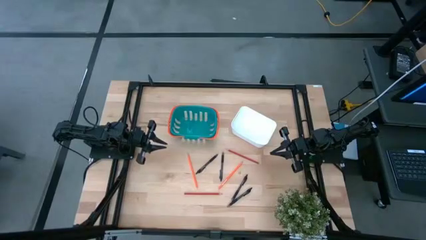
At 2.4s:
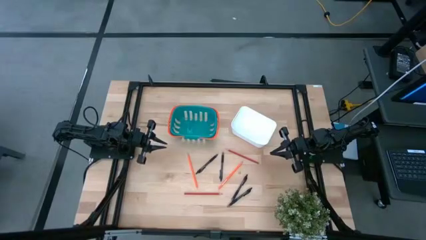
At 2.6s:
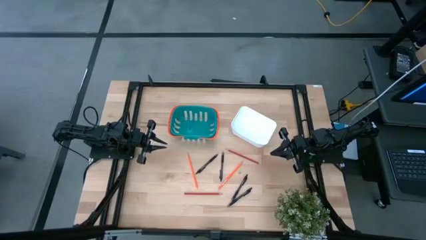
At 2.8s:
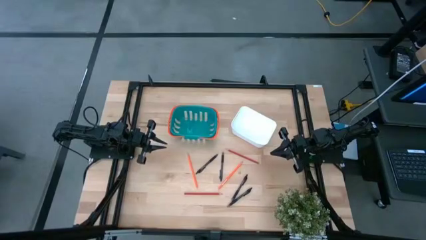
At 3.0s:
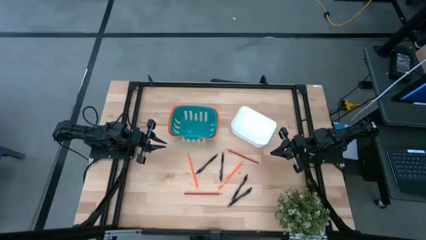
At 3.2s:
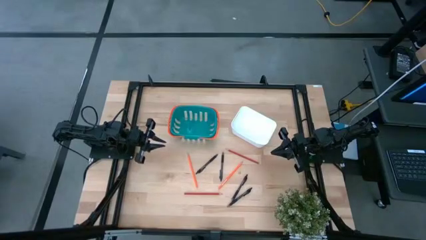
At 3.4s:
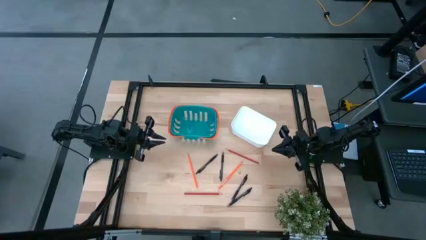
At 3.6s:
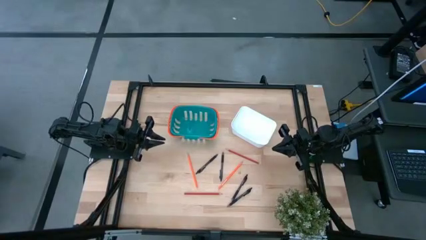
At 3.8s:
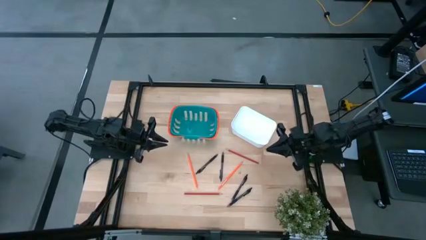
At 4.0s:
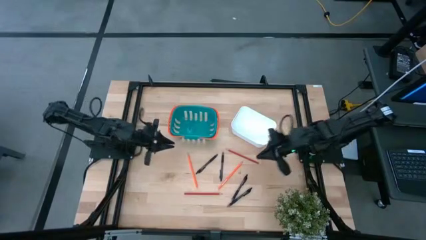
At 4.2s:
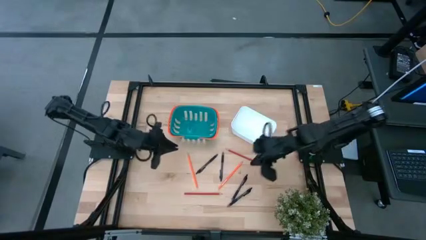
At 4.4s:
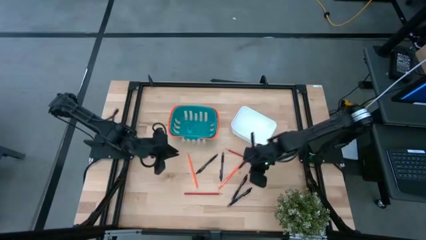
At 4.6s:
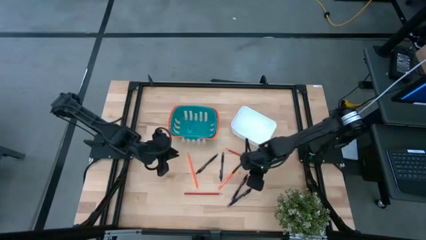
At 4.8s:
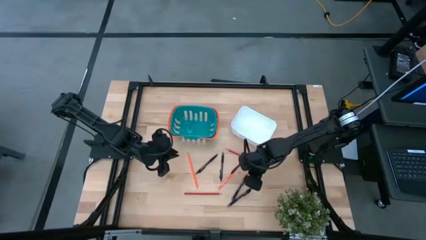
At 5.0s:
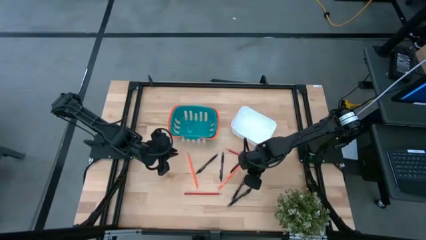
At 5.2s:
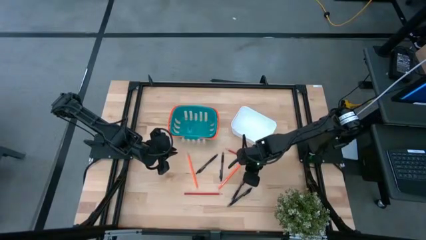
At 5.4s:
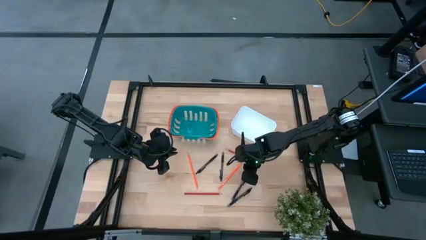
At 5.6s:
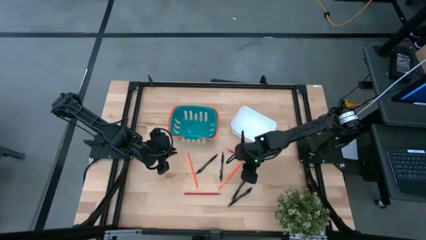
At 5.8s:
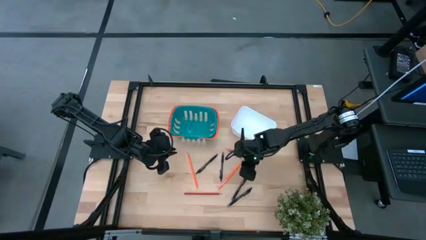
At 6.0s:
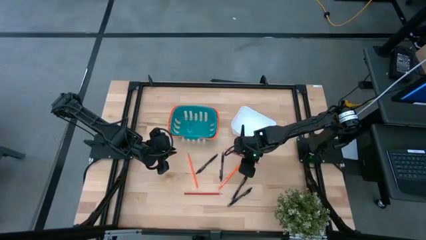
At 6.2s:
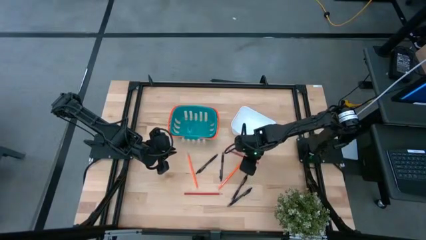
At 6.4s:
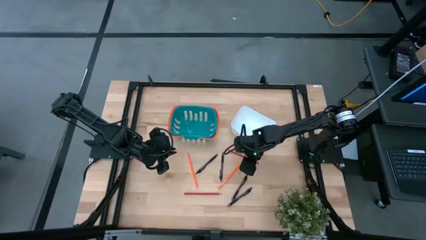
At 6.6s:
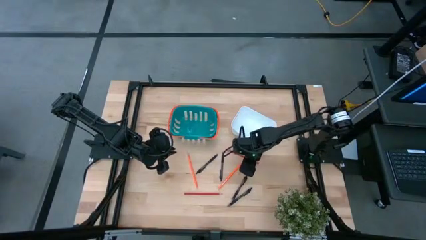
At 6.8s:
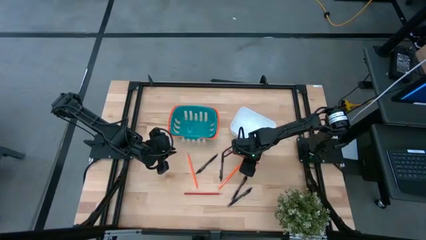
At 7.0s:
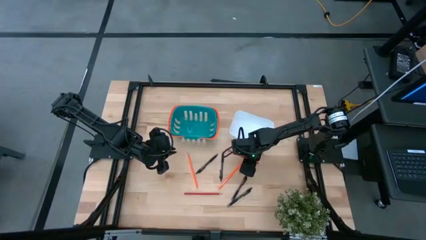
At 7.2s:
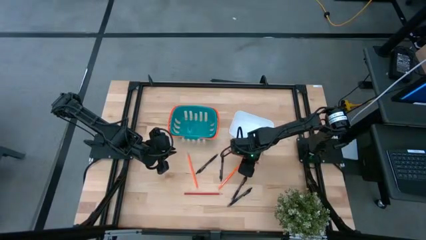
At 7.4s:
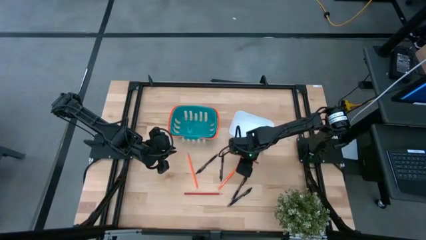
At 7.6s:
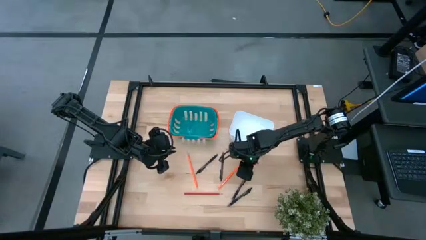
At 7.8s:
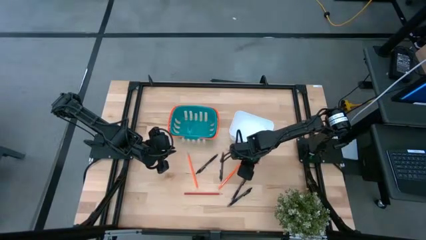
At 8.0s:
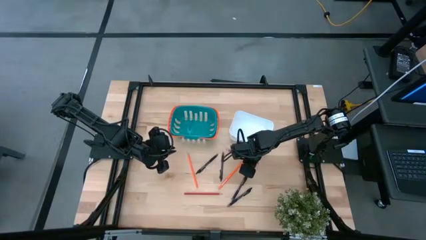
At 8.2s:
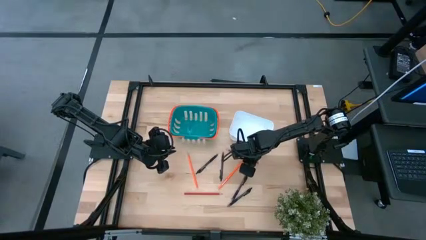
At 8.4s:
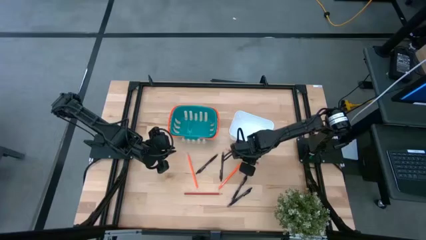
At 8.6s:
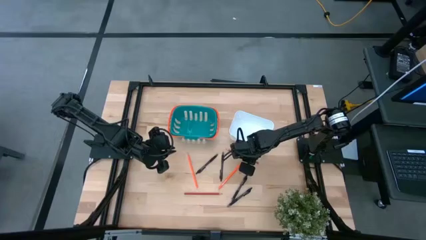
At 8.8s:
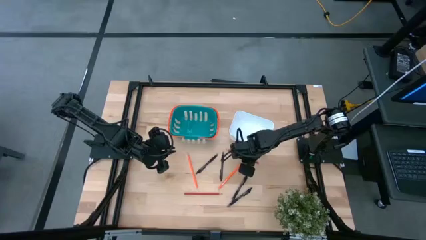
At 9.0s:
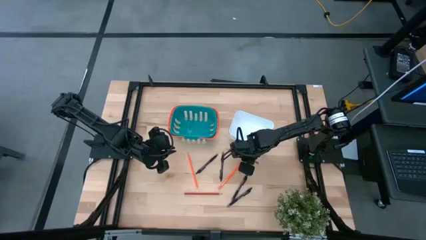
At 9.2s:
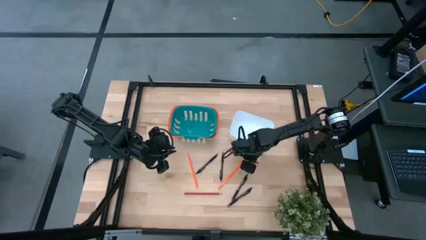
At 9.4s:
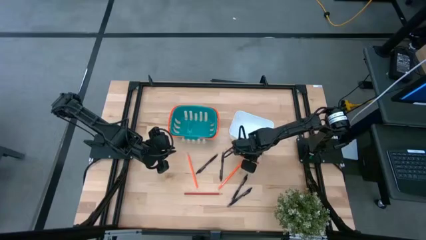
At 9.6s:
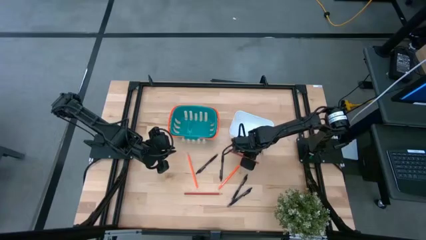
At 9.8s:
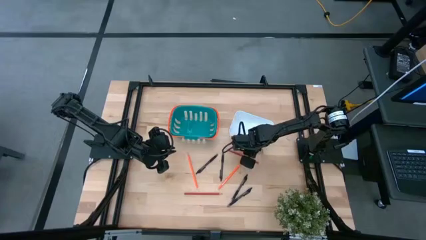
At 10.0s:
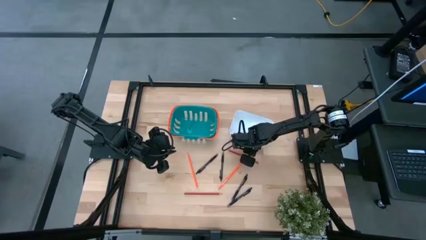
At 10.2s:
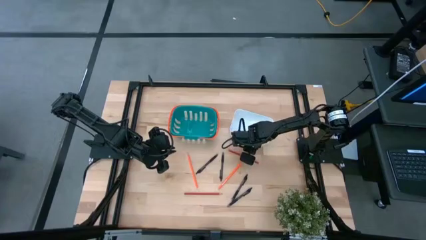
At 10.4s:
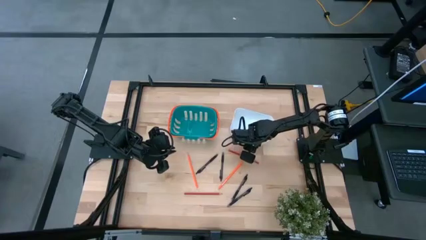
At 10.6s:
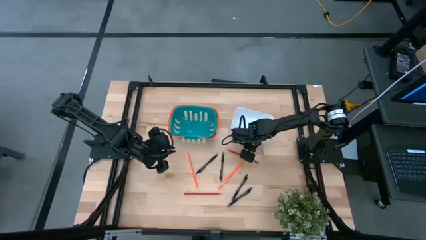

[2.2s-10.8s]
Task: Sort pens & pencils
Adjust the white bin

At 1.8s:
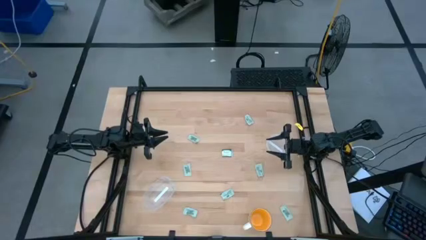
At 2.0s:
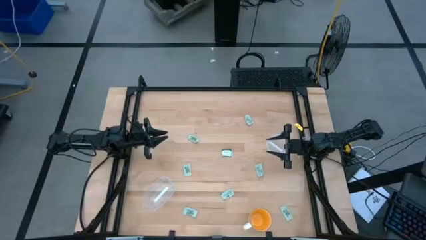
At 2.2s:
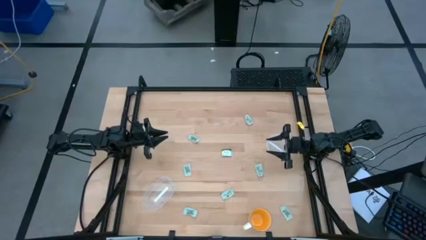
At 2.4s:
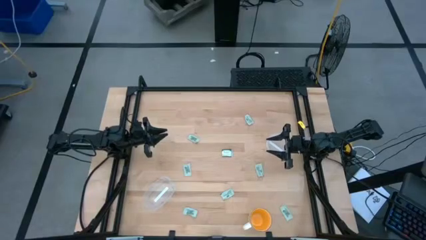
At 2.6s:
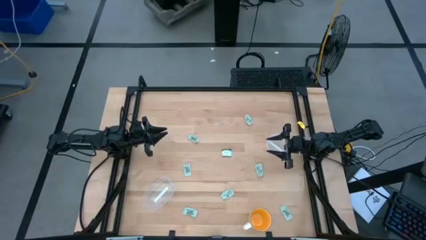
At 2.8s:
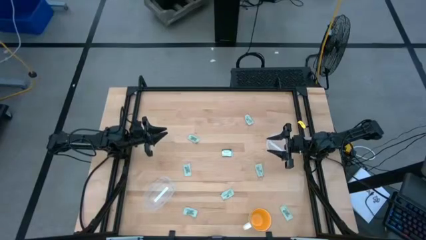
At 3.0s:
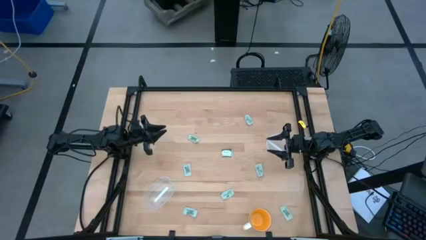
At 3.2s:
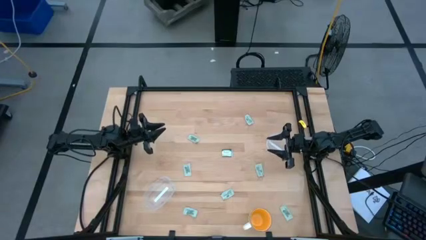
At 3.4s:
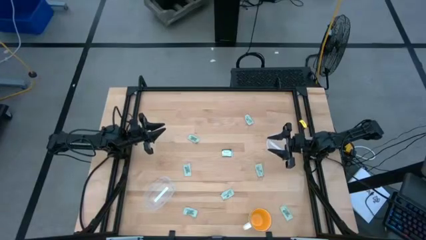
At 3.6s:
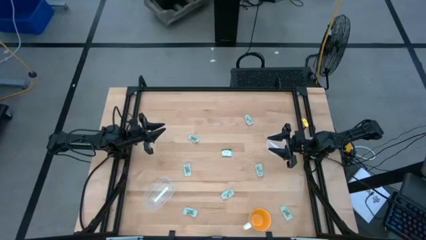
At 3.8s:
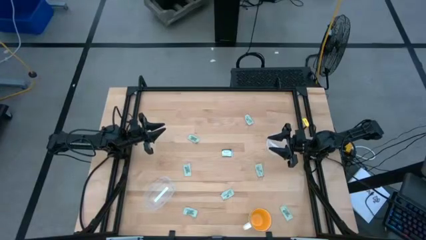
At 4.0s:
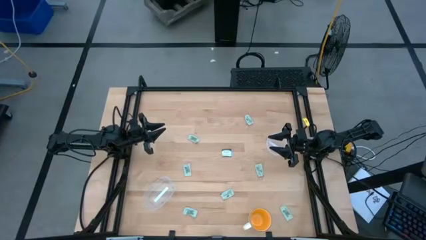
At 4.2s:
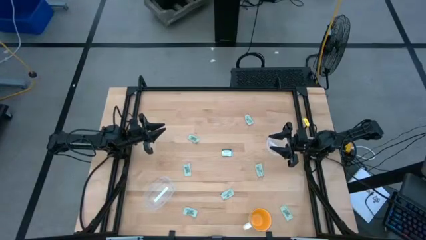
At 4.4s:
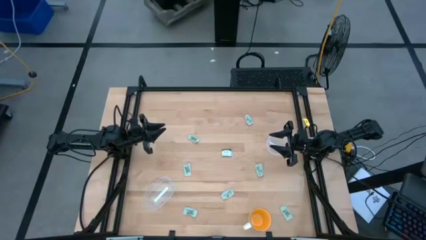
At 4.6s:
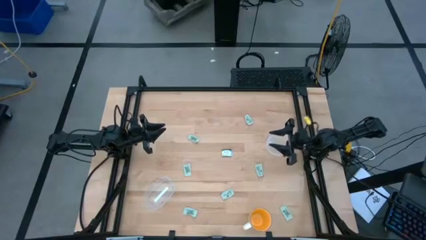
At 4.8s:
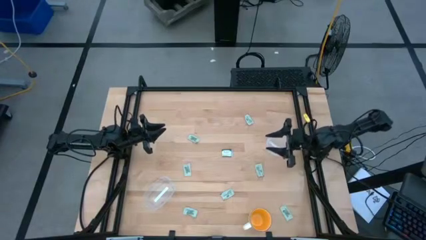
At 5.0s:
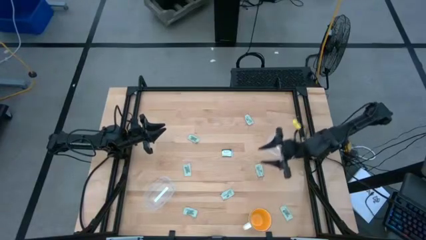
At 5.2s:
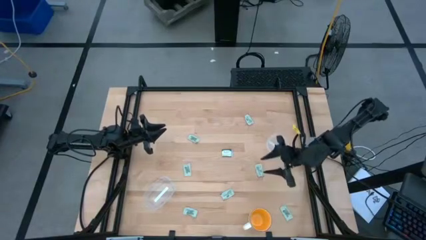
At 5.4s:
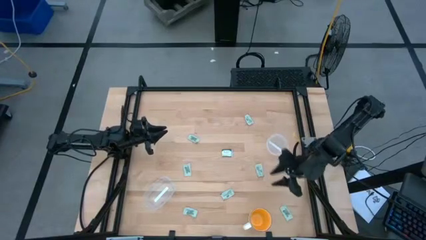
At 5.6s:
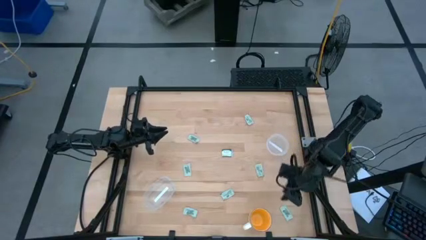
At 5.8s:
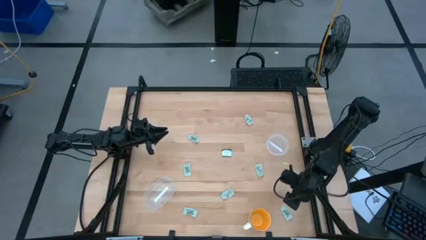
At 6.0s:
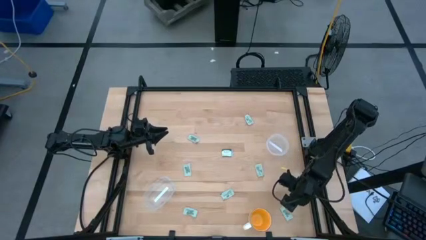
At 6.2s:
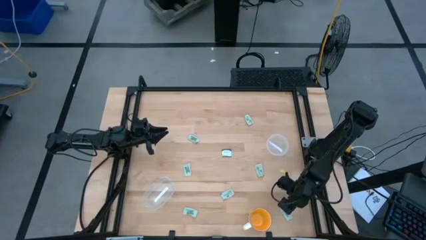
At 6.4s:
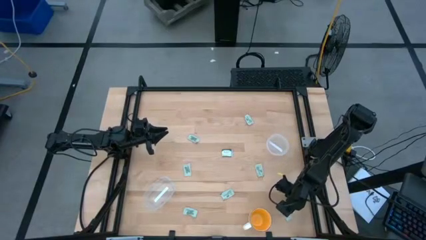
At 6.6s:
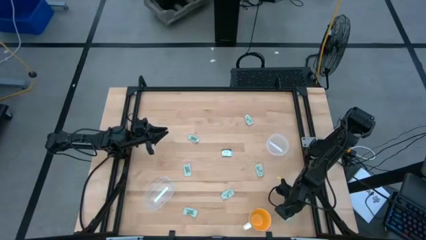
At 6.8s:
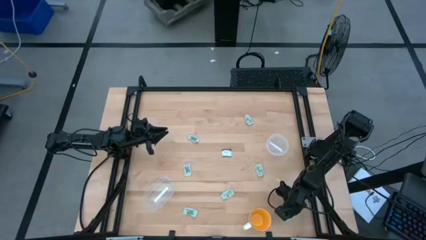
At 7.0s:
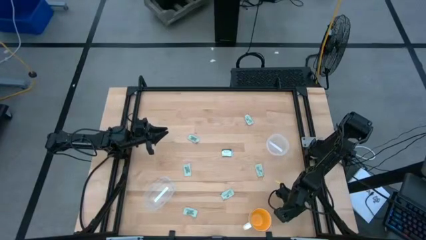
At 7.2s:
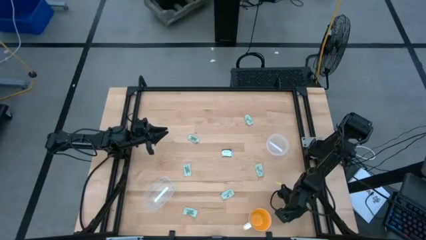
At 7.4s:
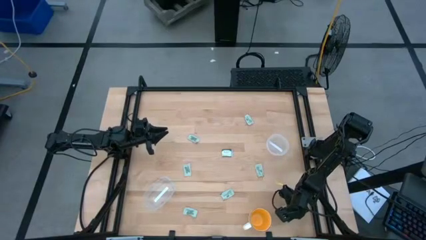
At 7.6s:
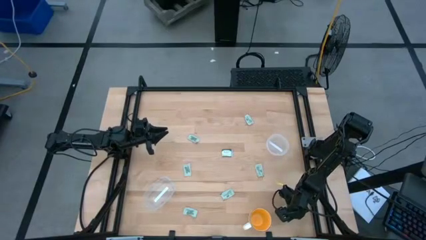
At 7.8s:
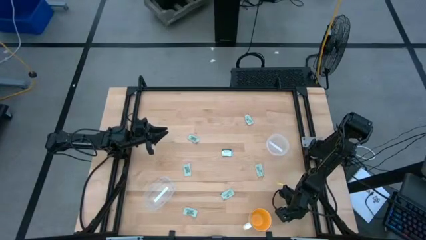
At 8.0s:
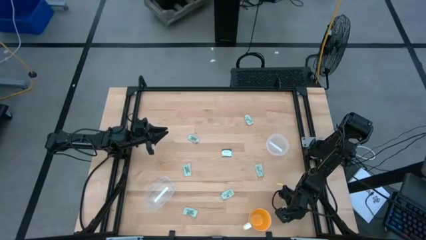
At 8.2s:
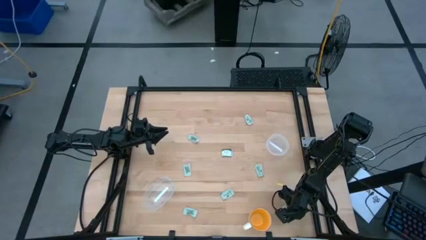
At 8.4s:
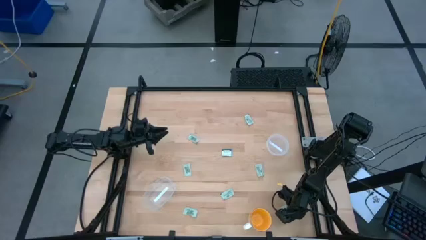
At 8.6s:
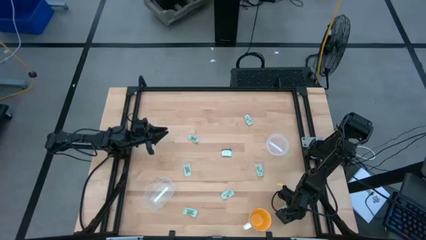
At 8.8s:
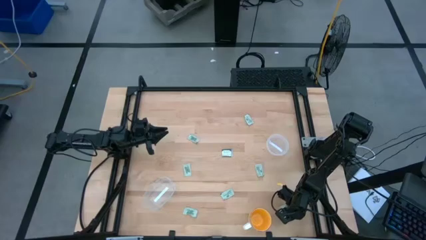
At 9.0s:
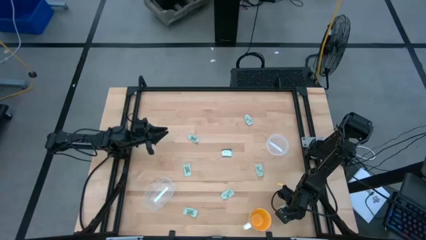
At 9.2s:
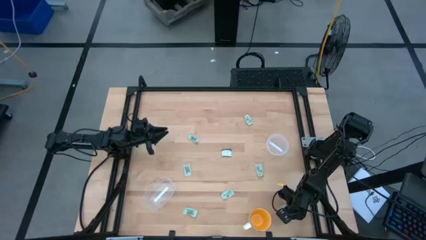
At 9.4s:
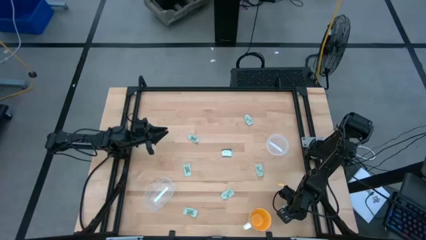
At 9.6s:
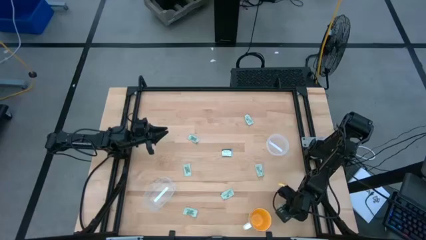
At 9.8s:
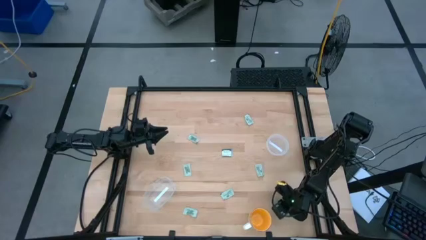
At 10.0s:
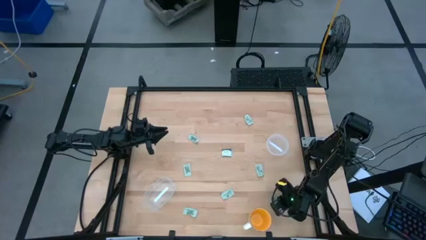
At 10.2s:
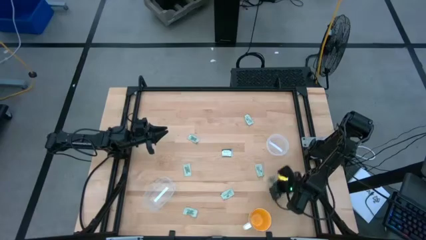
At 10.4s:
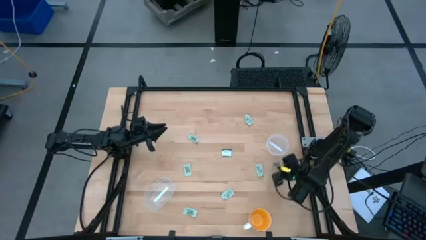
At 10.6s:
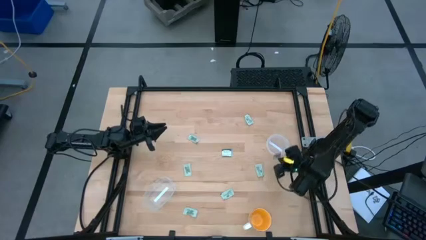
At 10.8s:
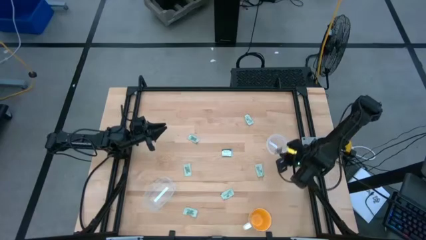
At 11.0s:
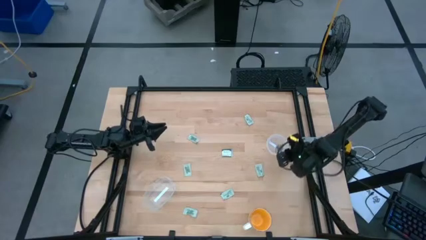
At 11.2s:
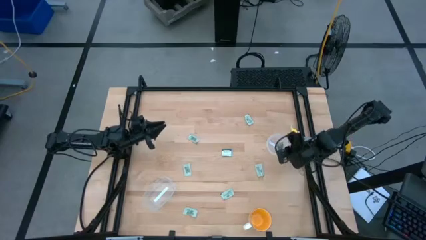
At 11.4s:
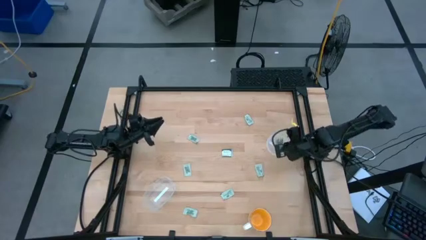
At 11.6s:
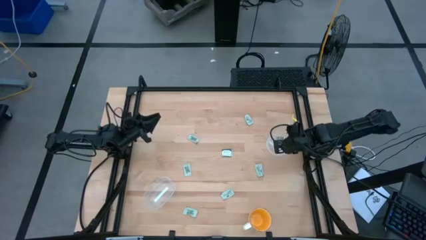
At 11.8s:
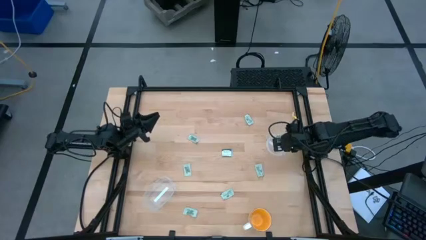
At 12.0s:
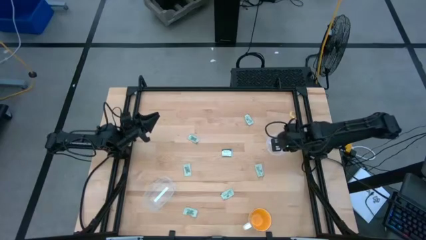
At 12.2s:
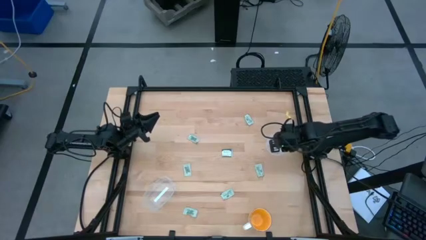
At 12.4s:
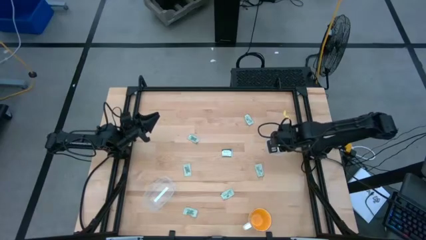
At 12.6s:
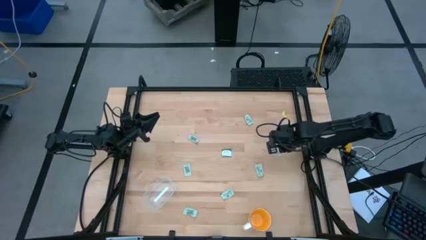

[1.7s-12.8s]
Task: Pick and place Stevia / Truvia into bins
Put the white stevia packet into the circle transparent container
